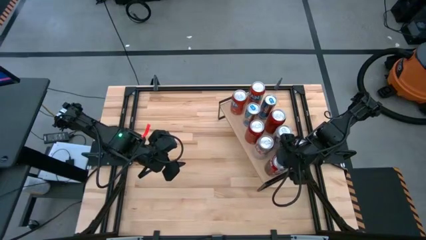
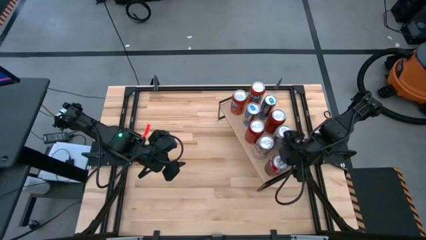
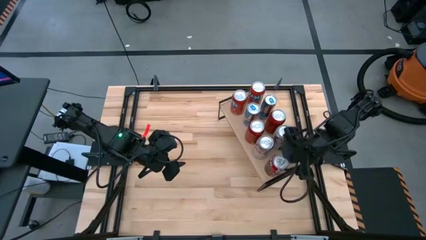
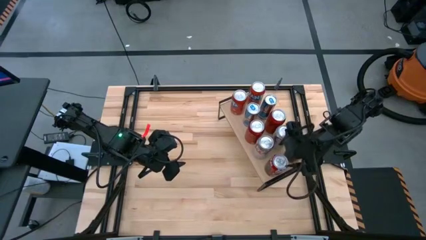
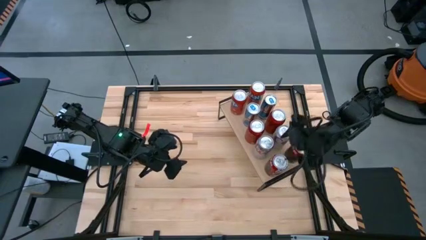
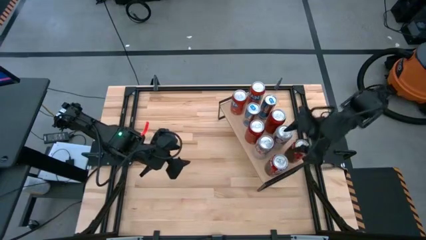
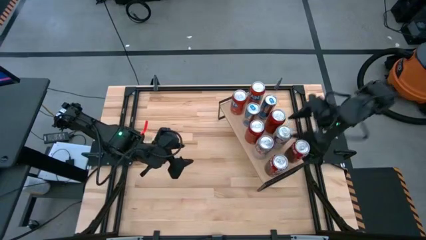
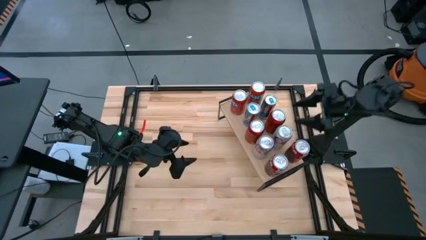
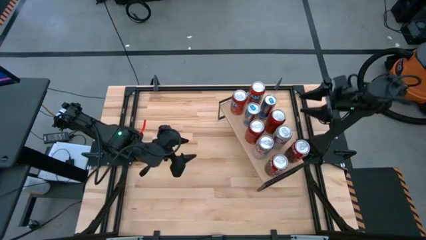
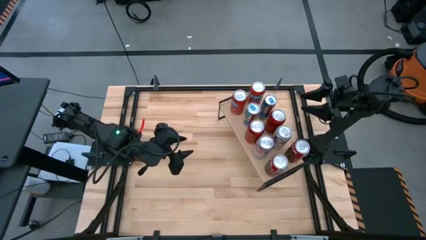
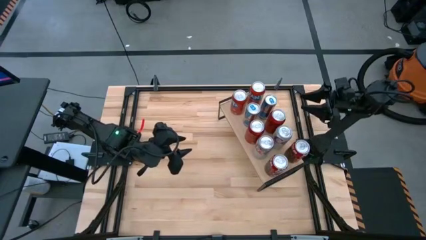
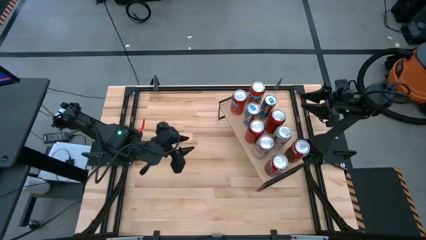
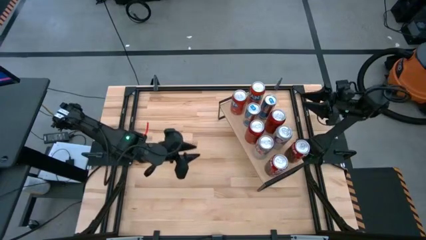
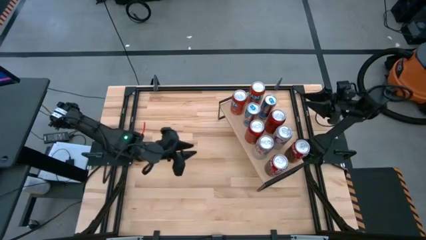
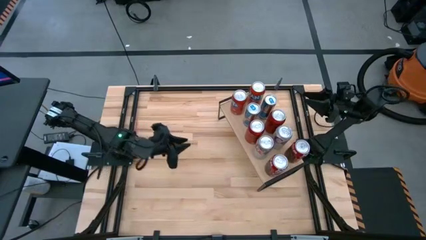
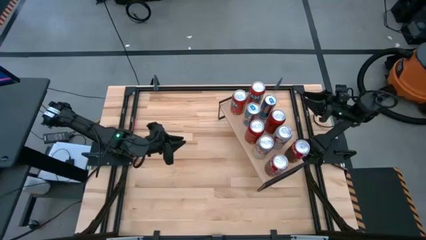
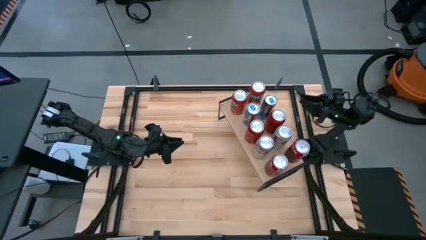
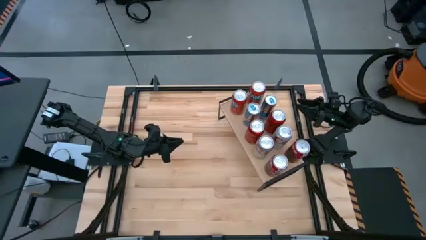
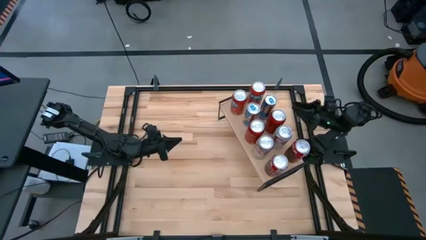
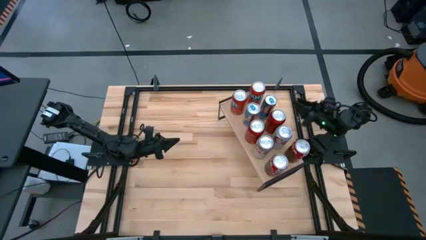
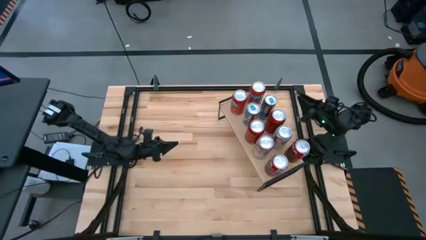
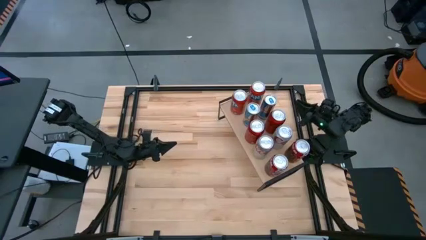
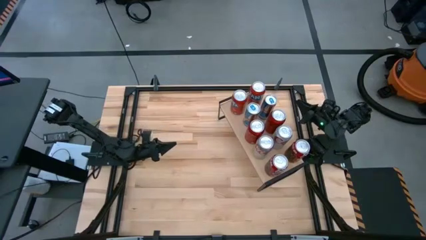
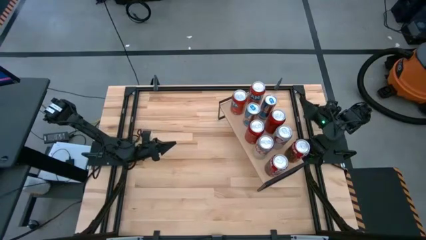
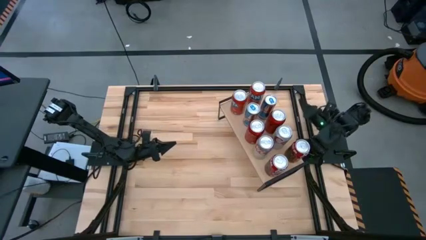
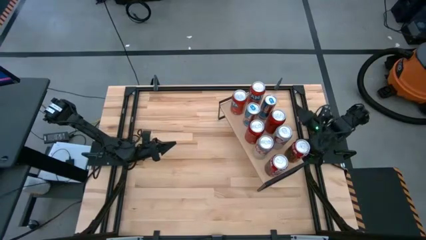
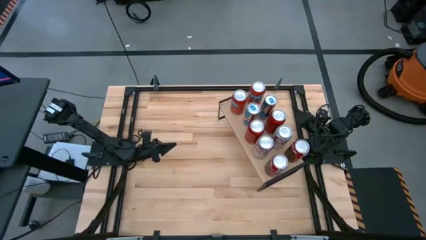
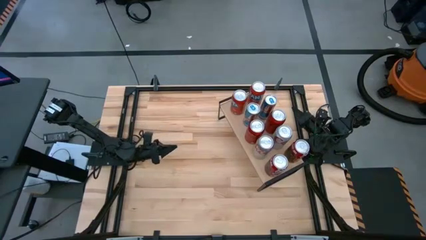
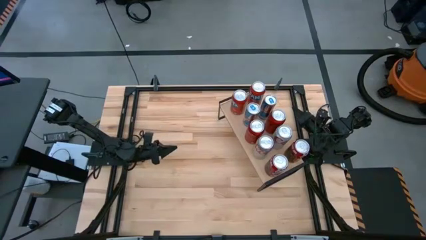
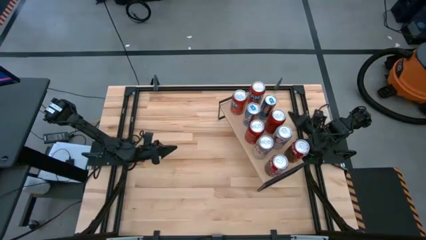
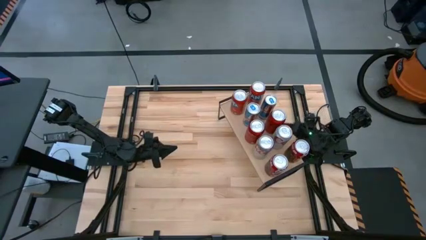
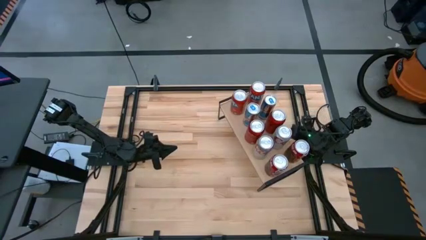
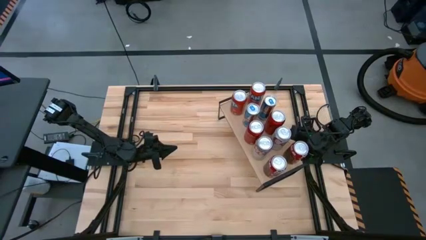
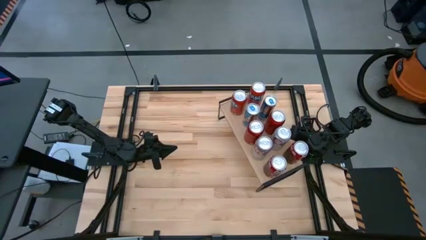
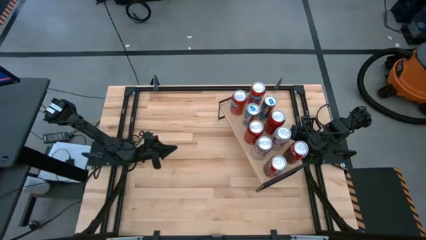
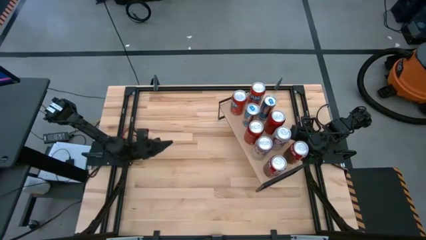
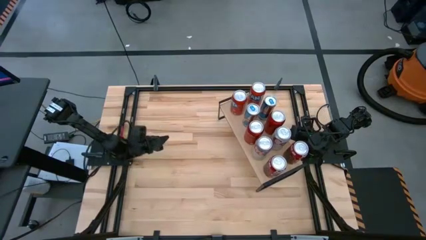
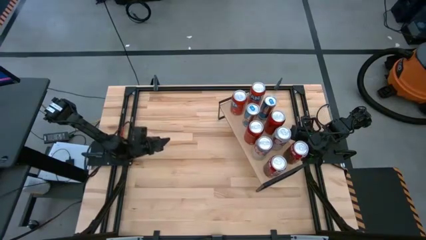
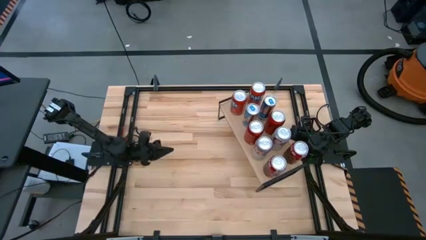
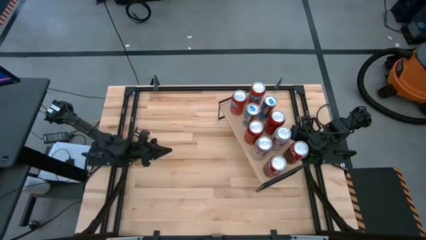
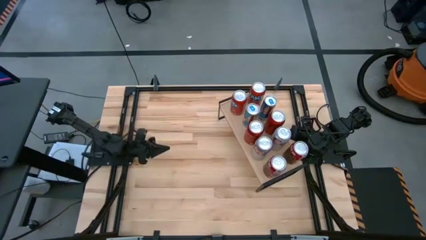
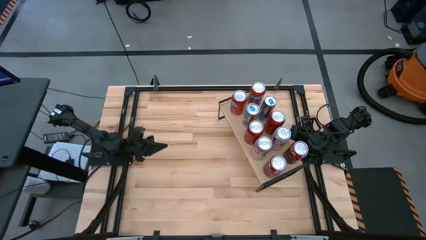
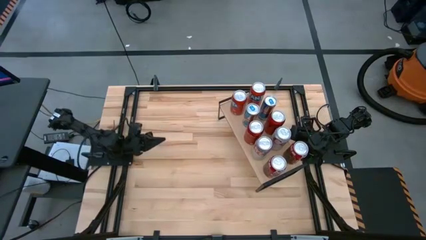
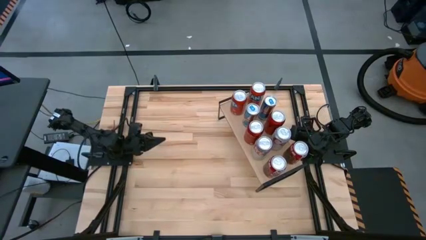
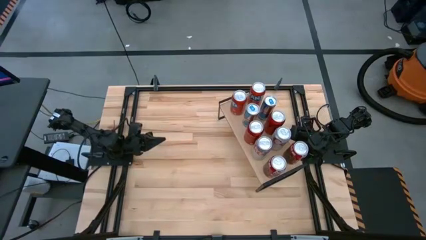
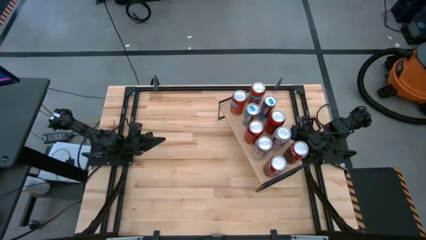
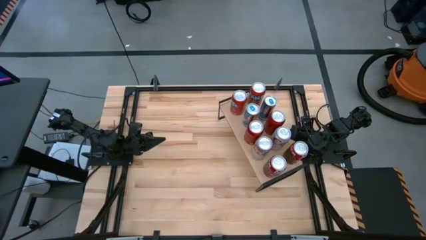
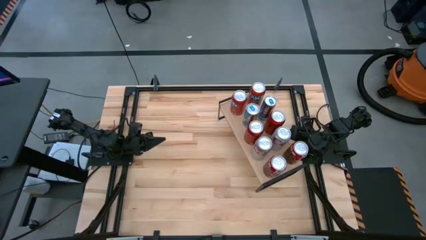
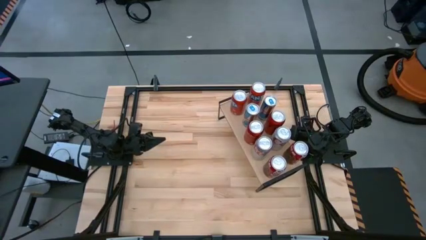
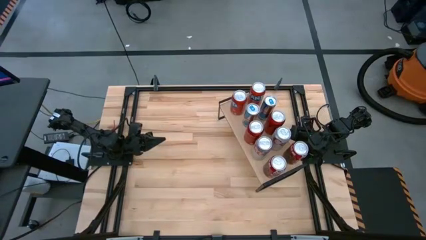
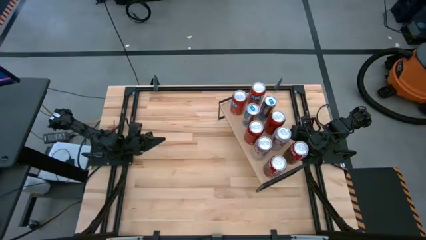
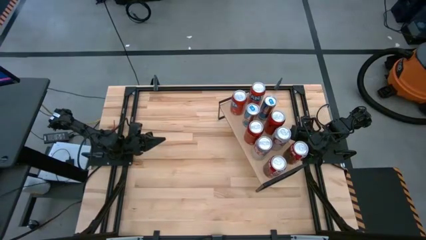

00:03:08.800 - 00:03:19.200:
Task: Place canned beverage on shelf
Return to Home Position
